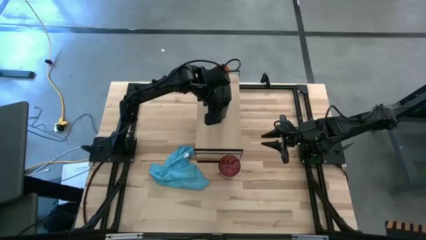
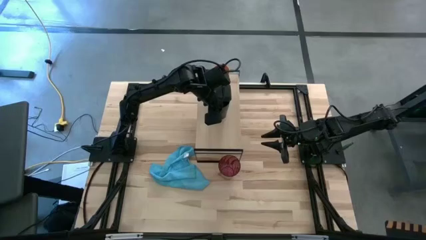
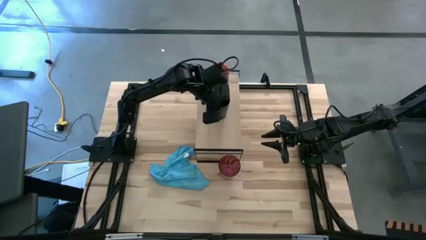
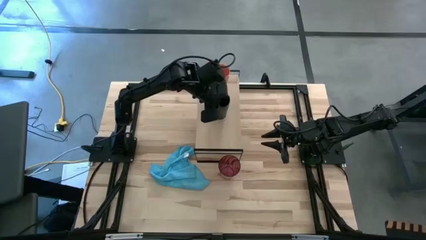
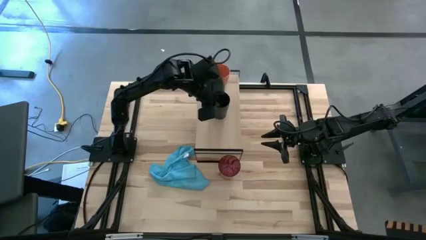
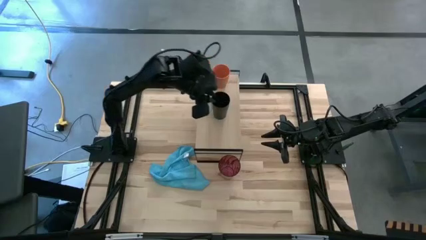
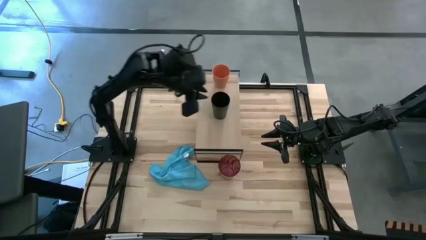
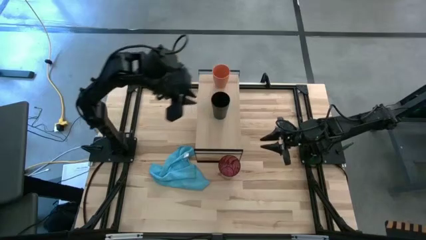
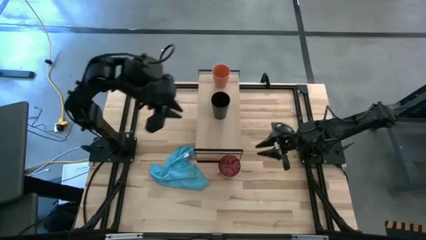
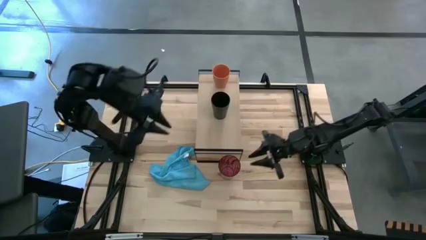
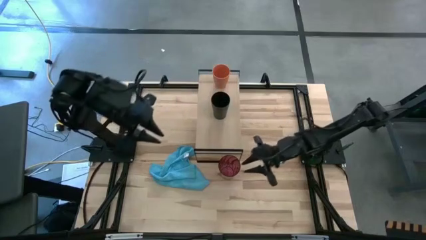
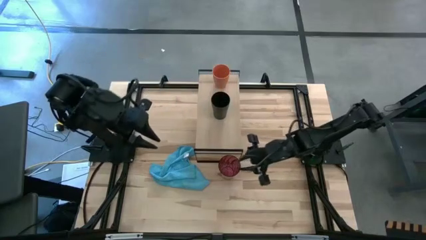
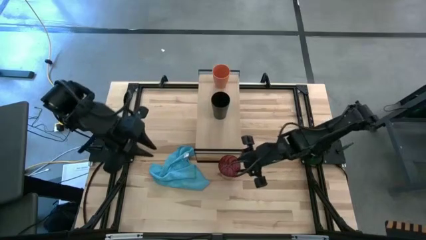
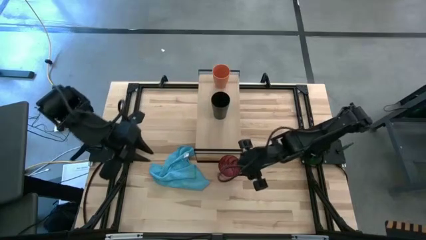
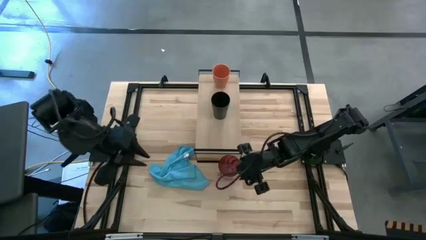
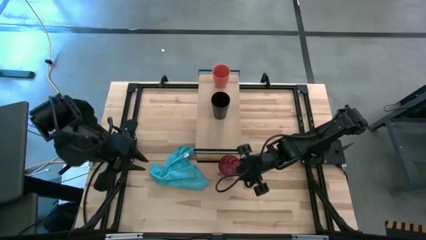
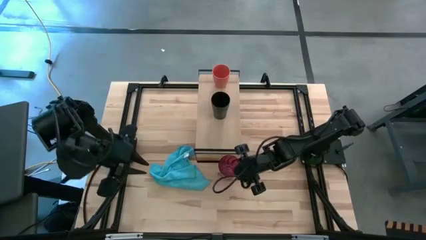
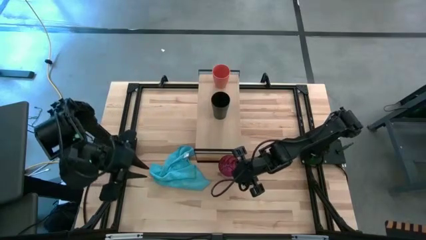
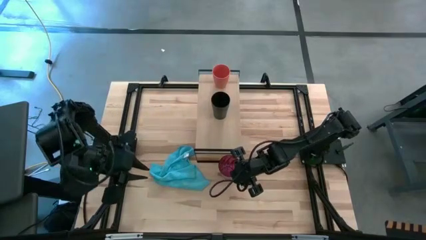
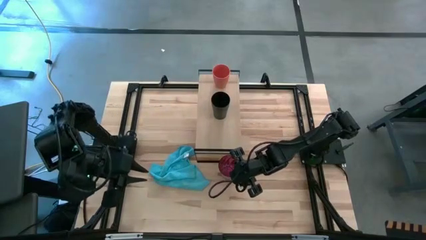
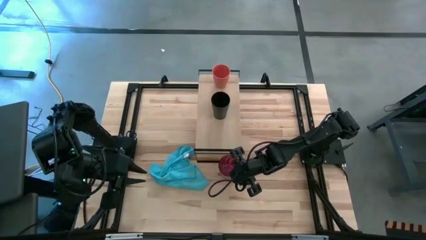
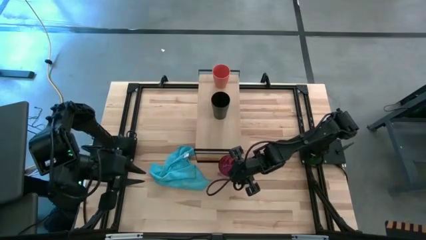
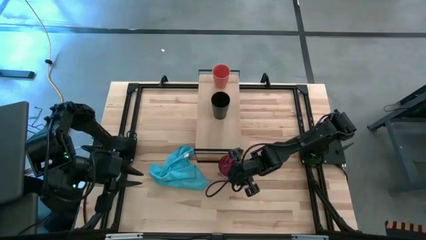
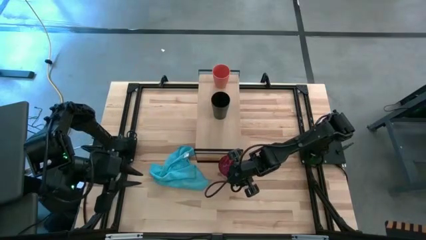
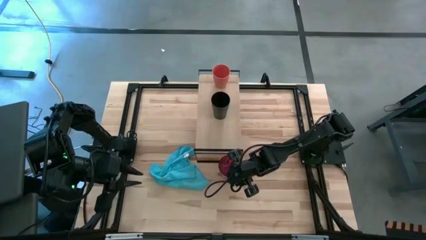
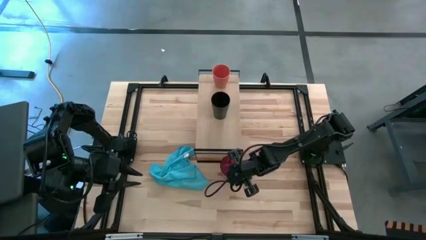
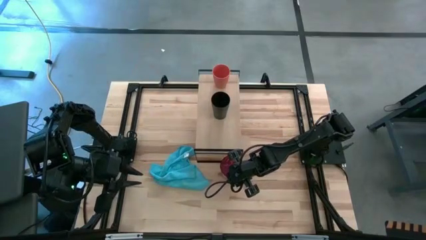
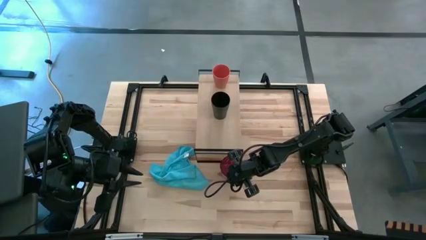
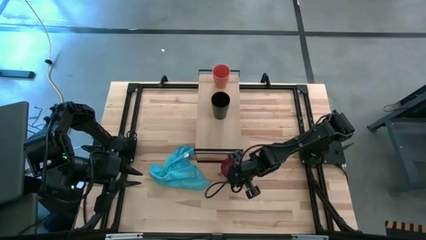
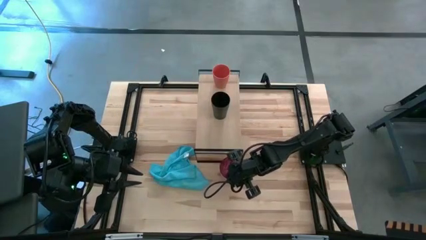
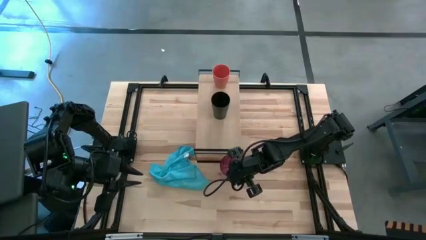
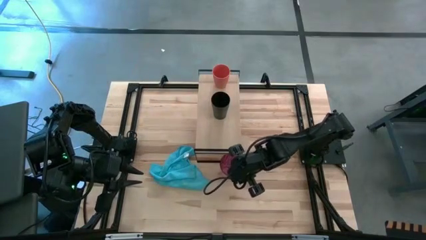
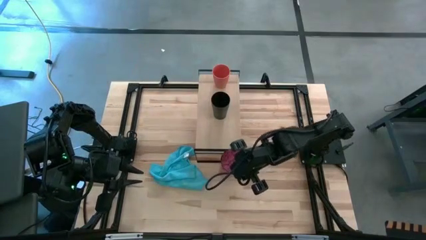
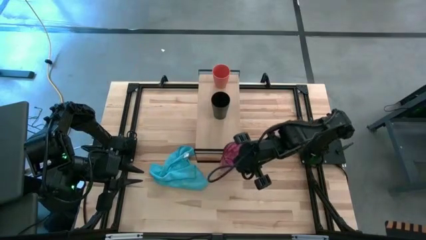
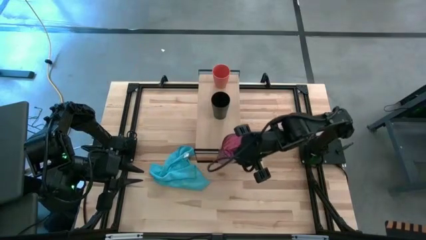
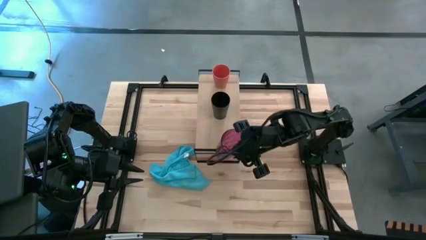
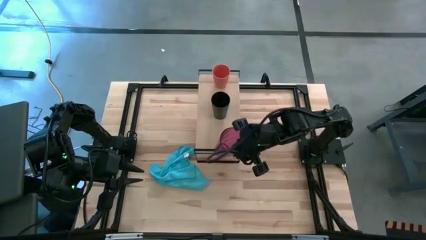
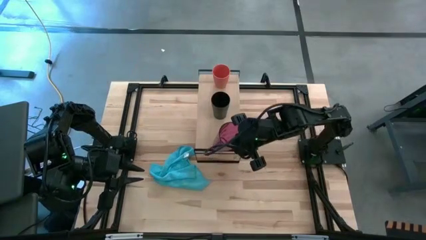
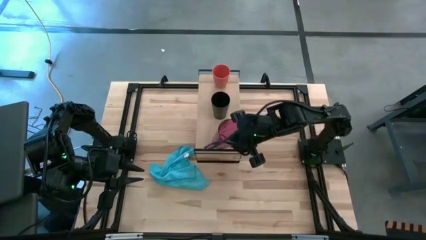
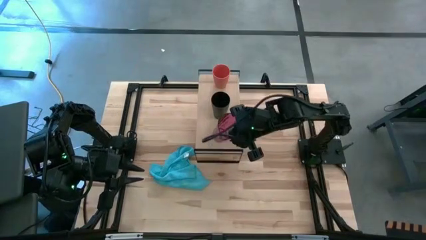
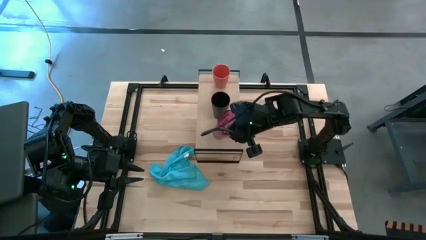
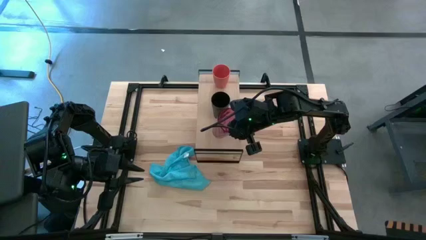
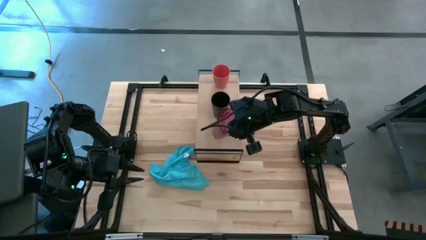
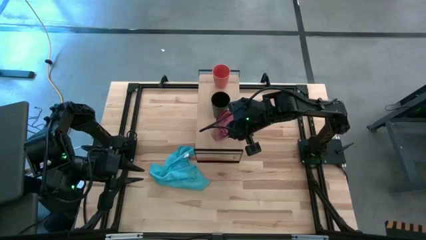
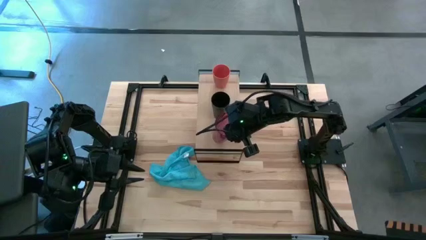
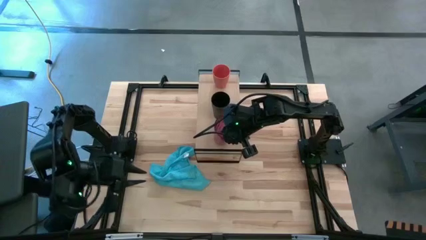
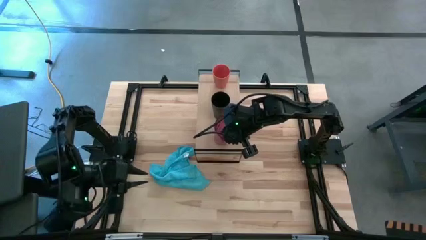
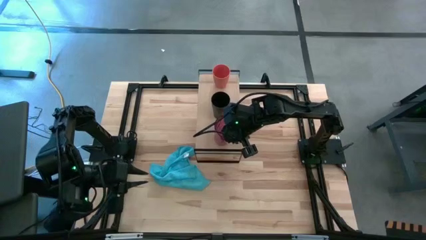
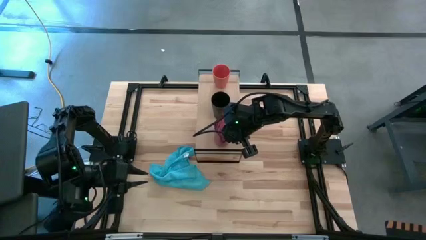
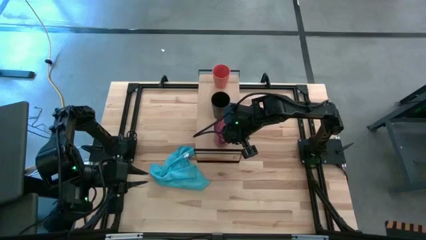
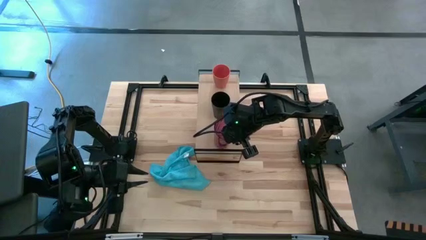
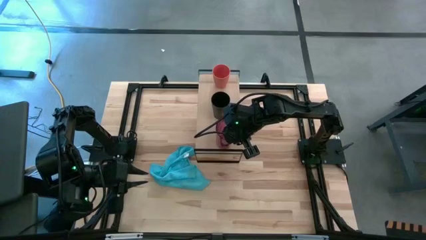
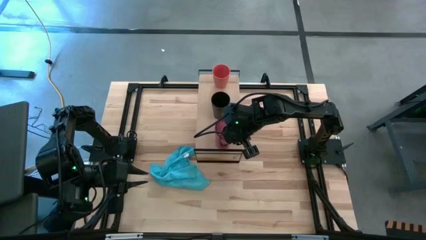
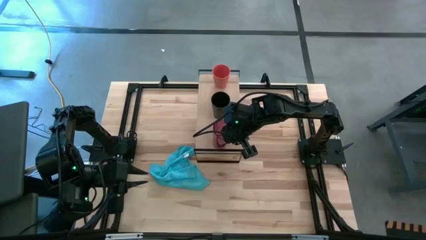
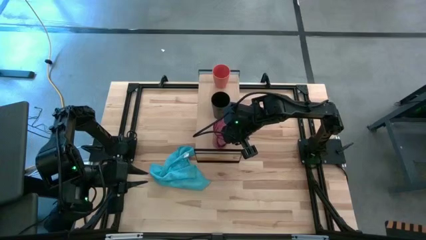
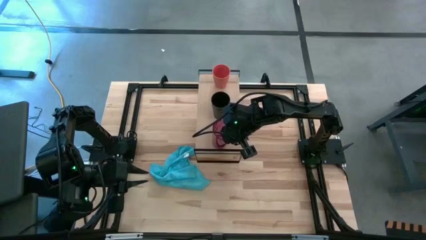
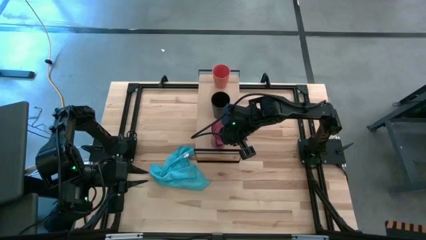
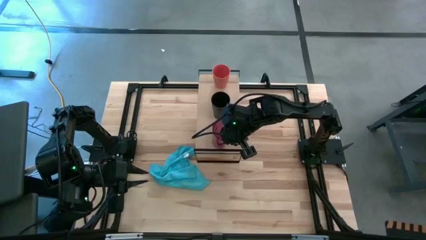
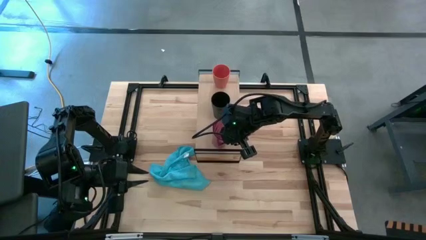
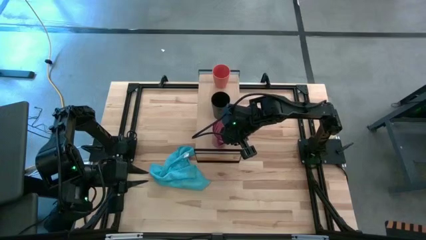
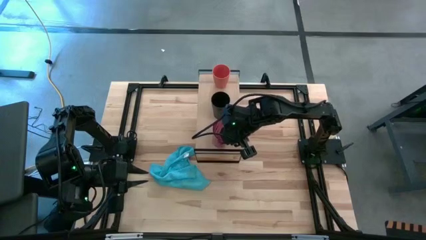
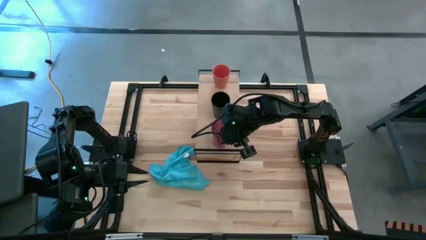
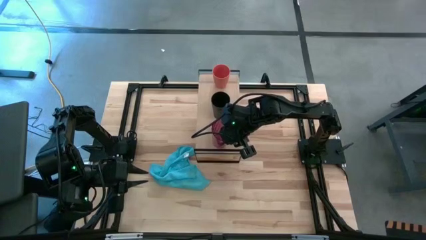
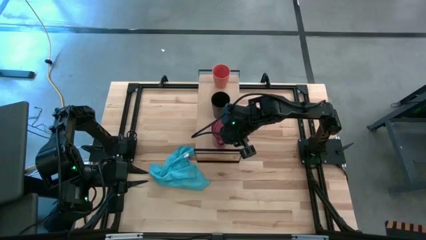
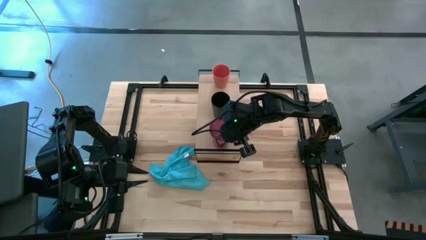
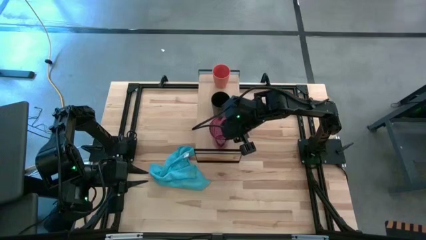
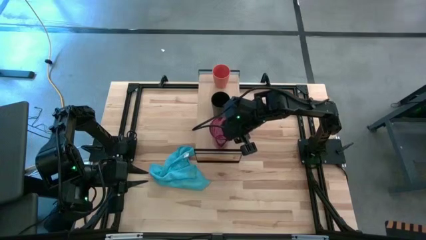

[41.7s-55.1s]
Task: Stack small to large cups/mugs on shelf
Put the red cup on the shelf
